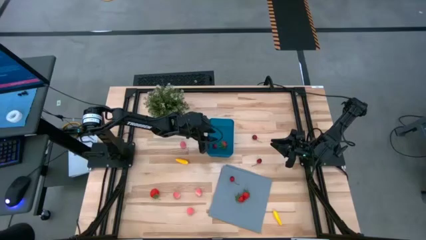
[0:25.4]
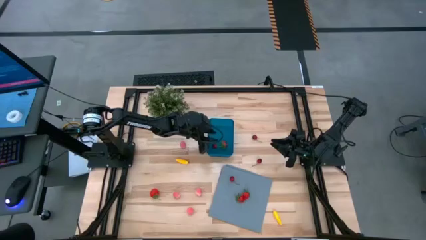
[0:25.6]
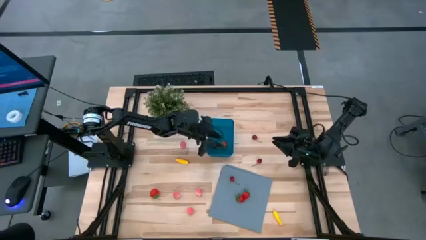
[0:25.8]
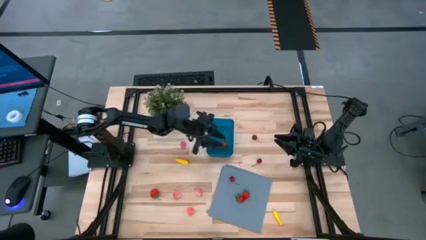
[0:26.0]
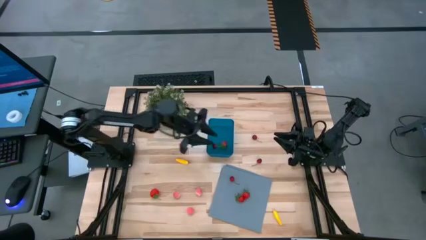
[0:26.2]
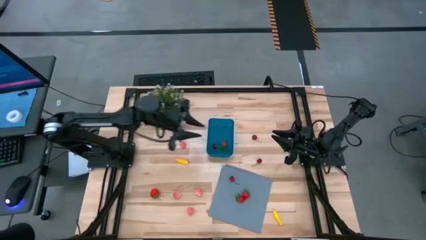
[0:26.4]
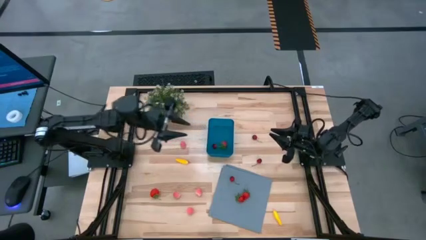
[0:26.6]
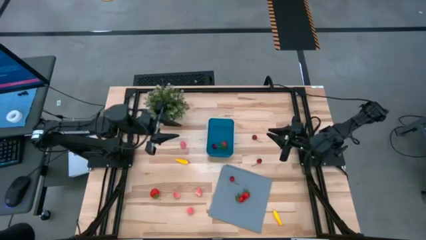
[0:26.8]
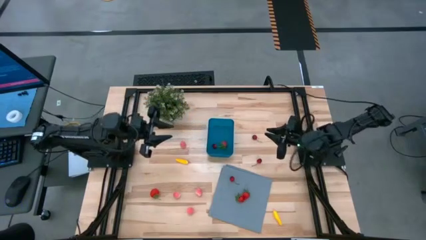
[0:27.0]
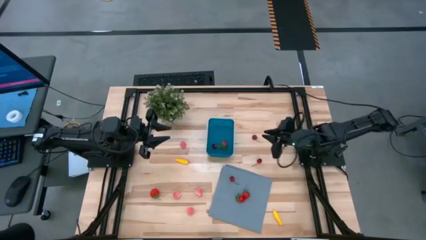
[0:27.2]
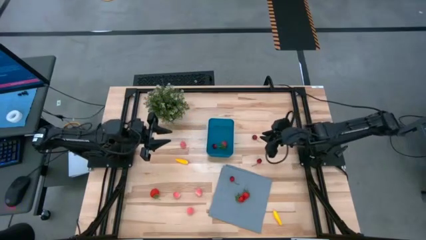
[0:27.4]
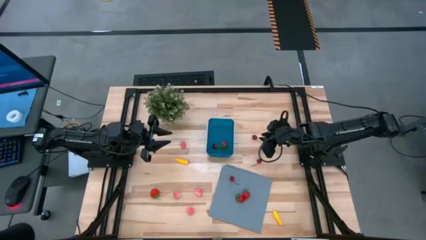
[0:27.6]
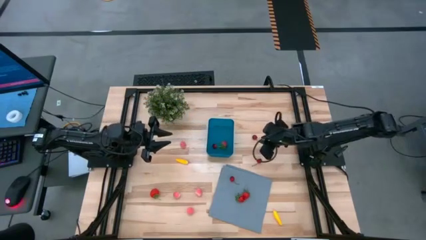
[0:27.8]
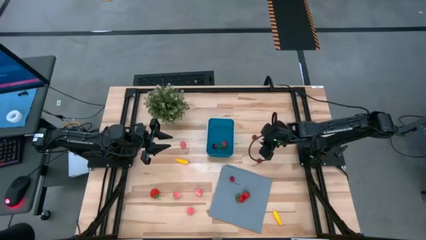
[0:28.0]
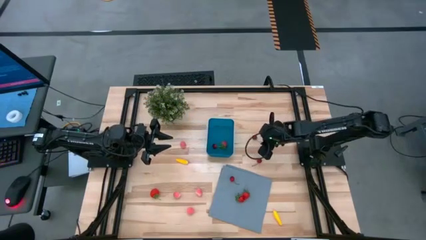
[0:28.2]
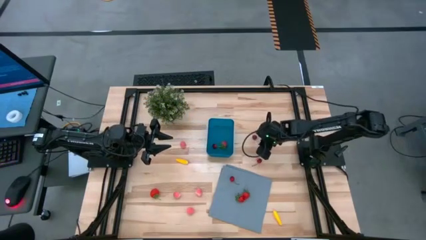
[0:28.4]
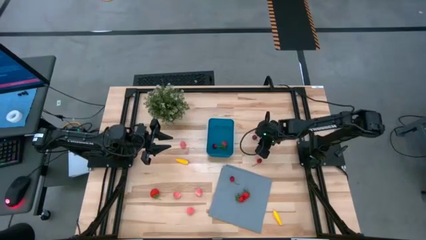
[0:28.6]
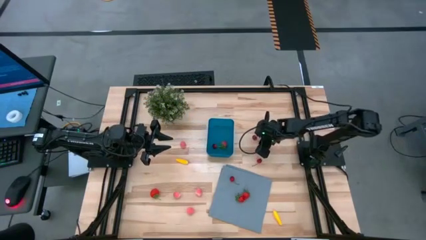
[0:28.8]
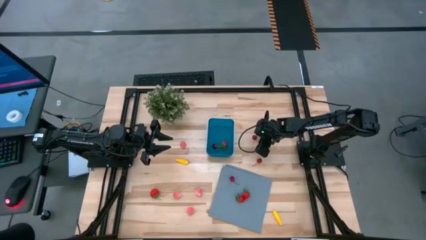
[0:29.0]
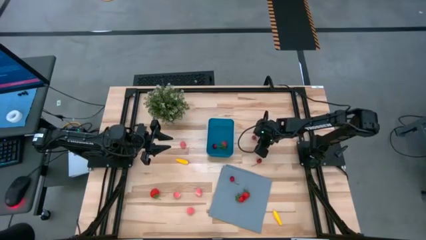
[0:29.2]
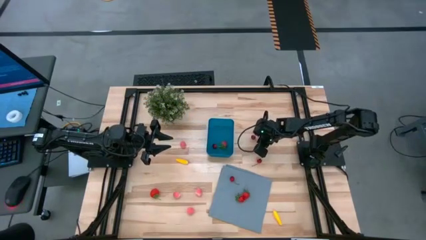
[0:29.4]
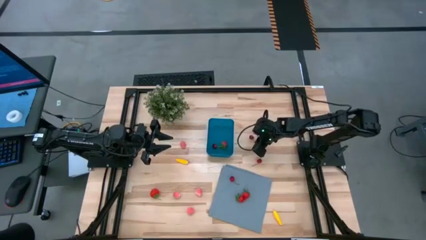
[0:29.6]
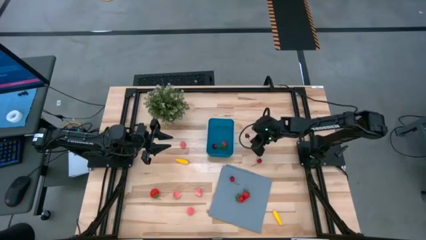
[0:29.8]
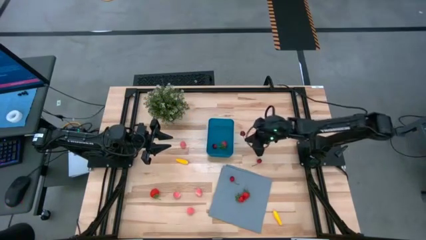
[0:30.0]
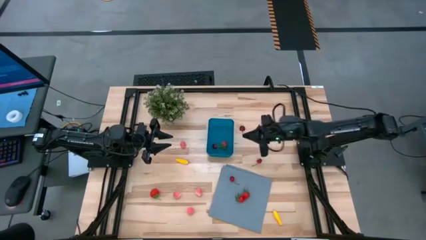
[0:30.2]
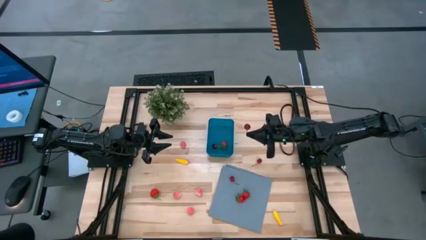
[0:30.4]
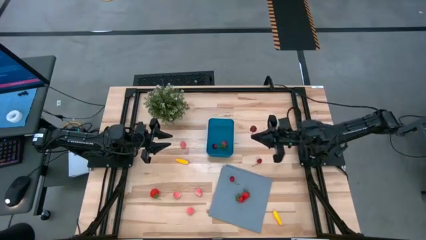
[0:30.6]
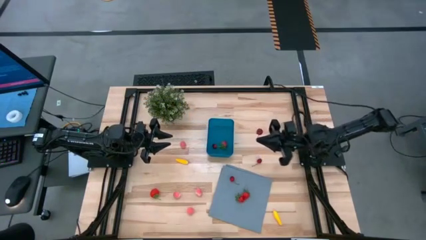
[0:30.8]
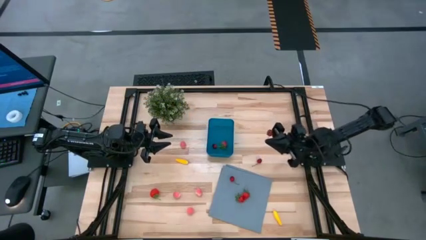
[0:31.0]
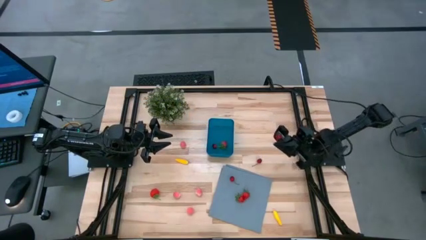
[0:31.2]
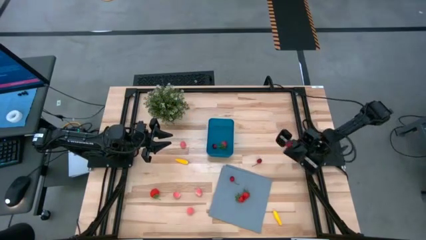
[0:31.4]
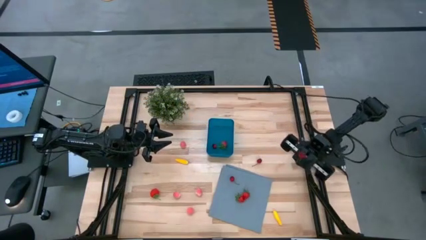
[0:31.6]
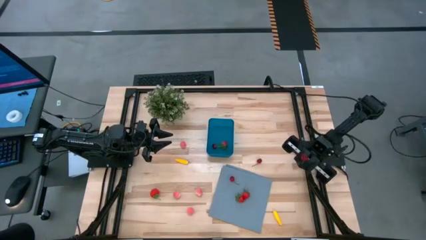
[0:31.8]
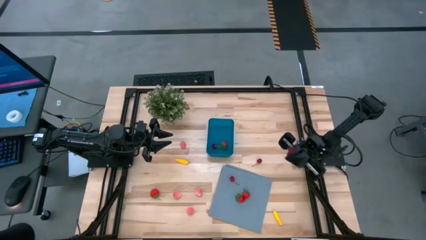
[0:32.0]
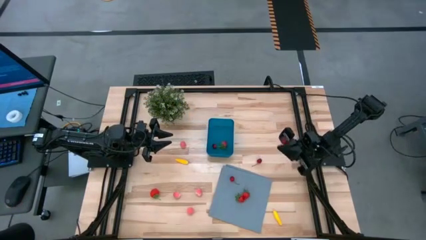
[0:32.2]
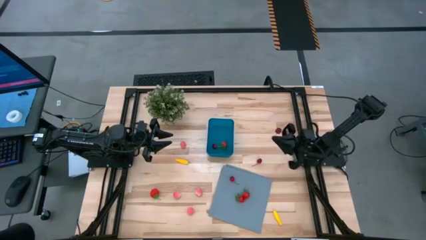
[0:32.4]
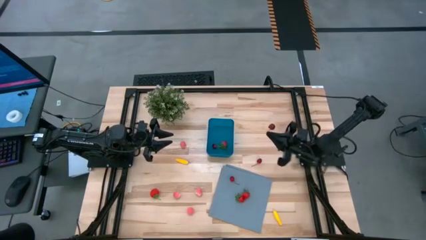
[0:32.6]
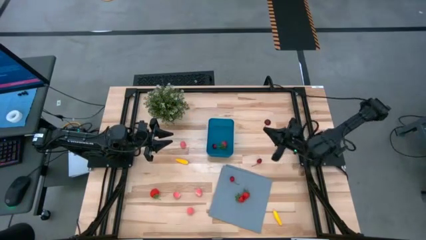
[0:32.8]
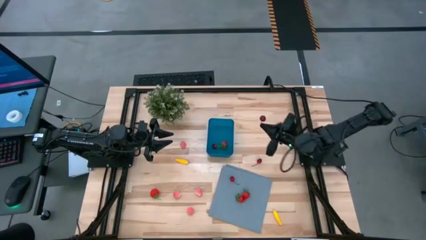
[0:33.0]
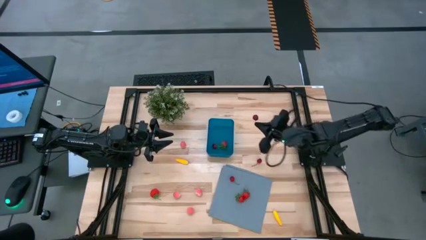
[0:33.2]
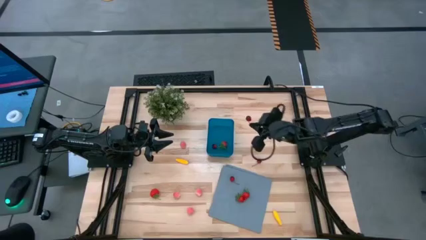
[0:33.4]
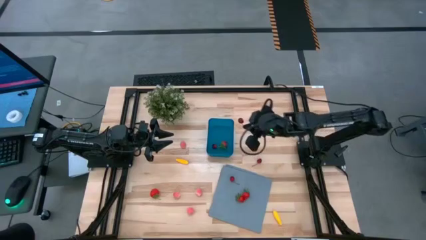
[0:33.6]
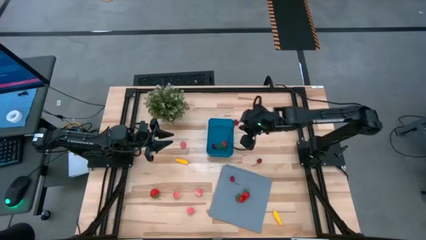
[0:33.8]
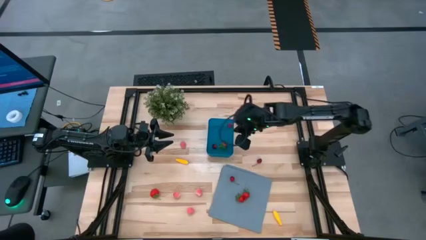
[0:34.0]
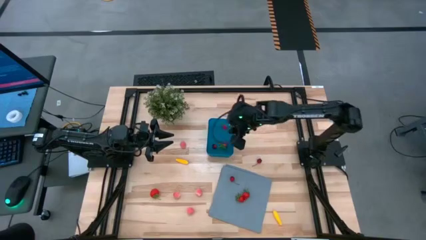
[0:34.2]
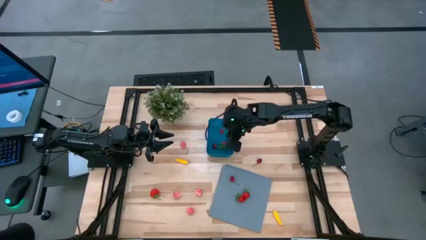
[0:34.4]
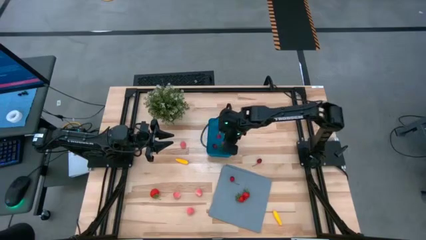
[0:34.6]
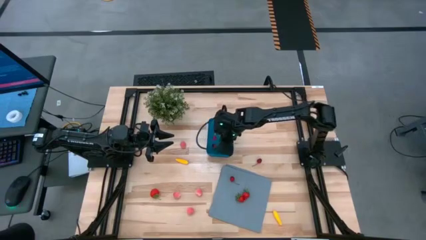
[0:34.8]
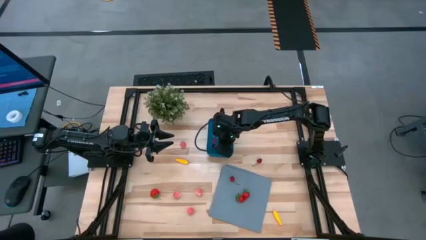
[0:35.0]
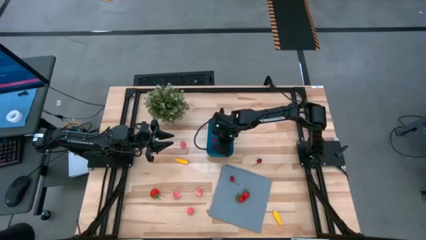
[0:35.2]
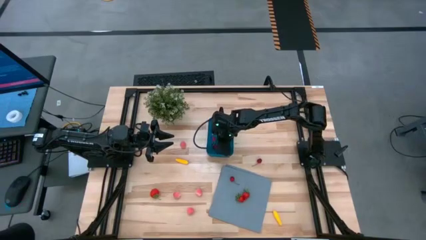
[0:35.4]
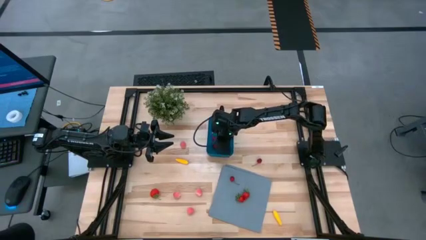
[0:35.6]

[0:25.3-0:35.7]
Task: Pick and placing Produce into tupperware
Put the cherry into the blue bin
